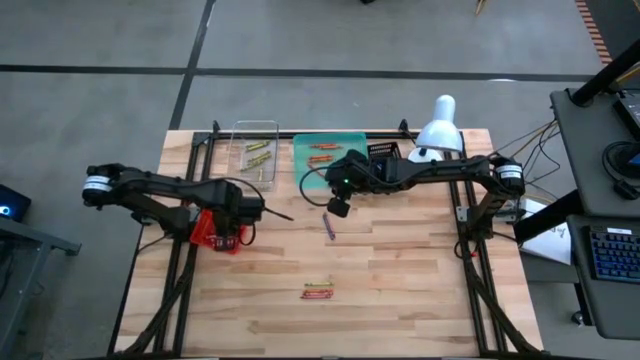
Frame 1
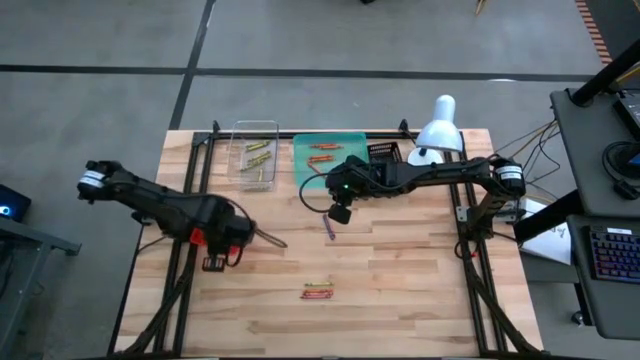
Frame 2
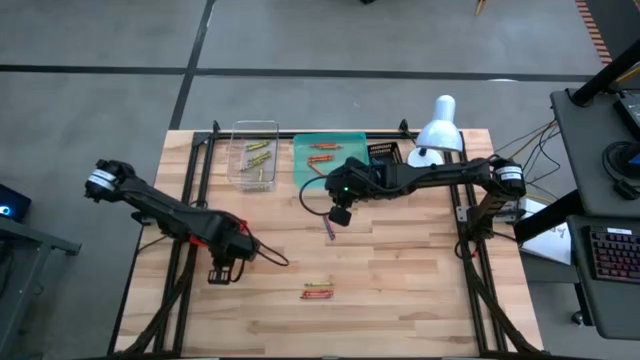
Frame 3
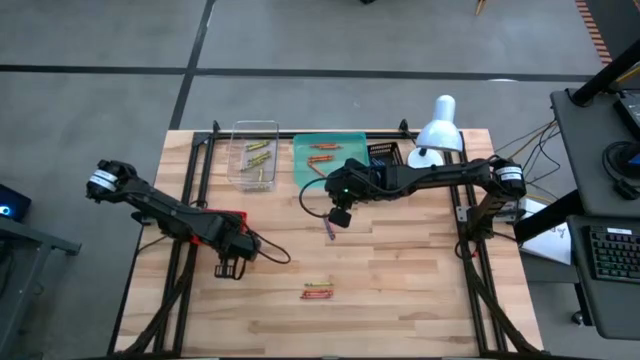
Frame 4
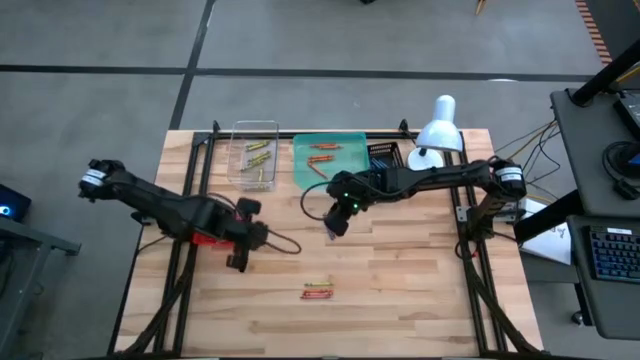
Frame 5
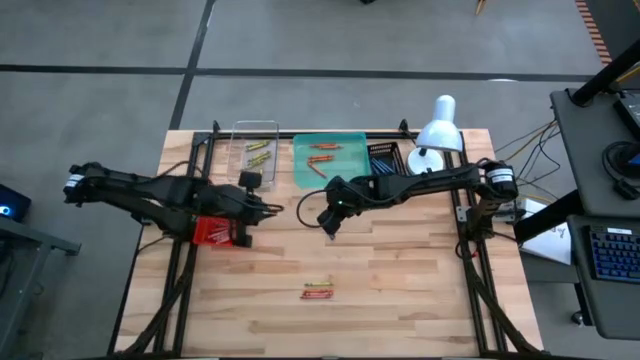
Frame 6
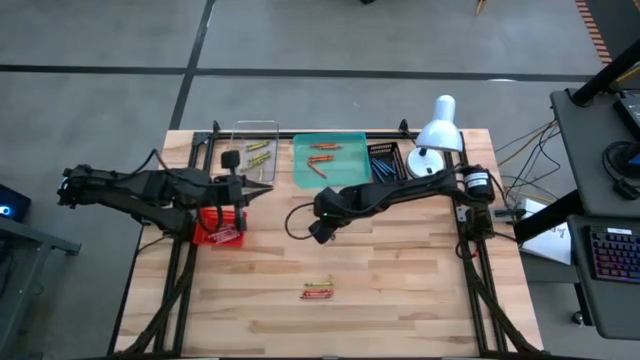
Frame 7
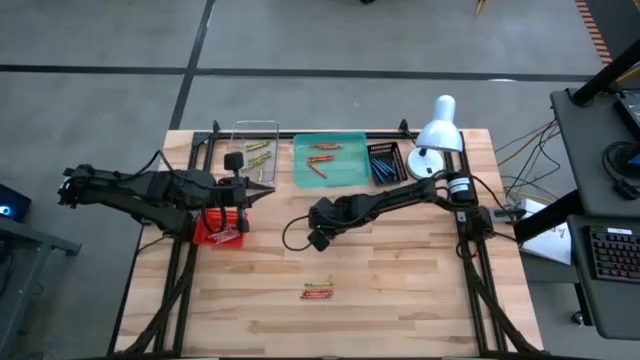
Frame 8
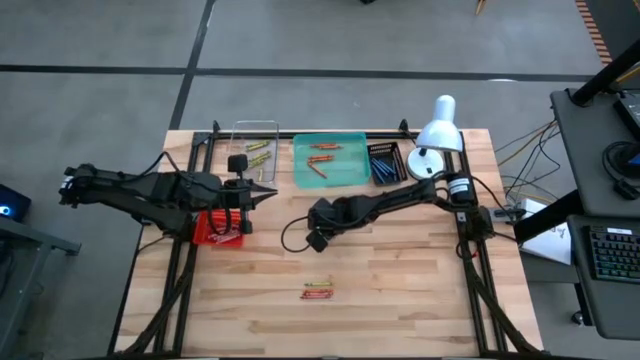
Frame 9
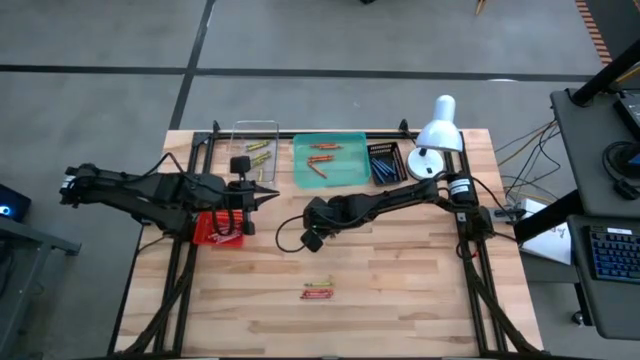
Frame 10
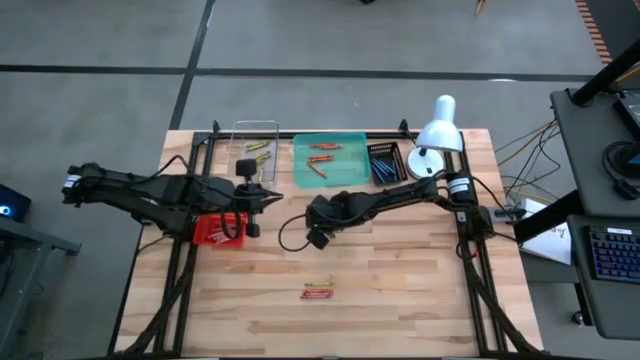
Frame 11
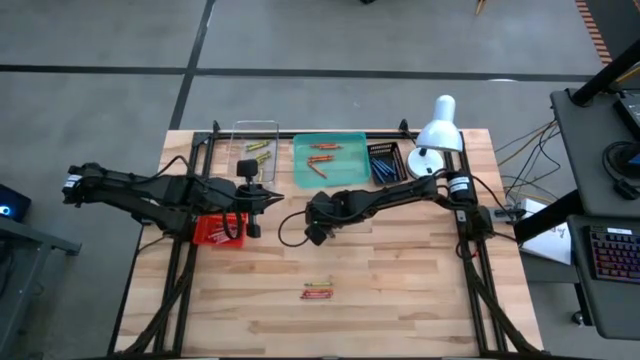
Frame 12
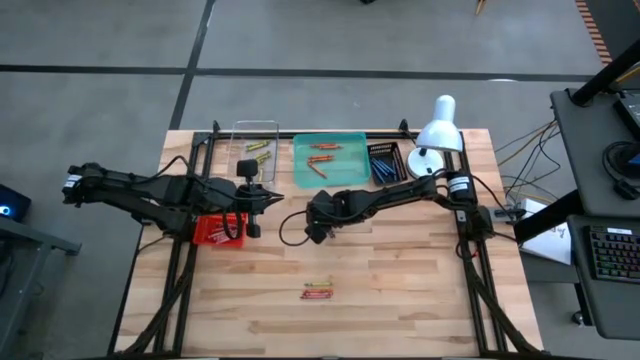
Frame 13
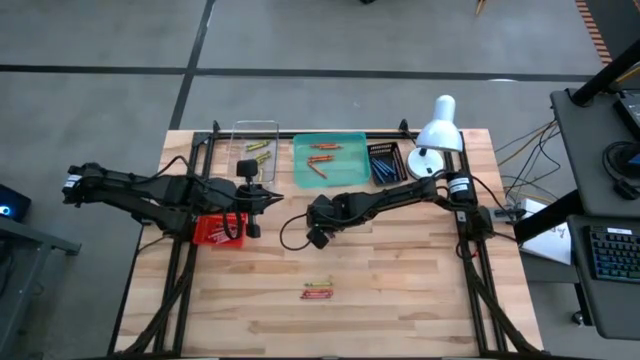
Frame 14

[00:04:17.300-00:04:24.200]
Task: Sort crayons
Put the blue crayon into the black bin

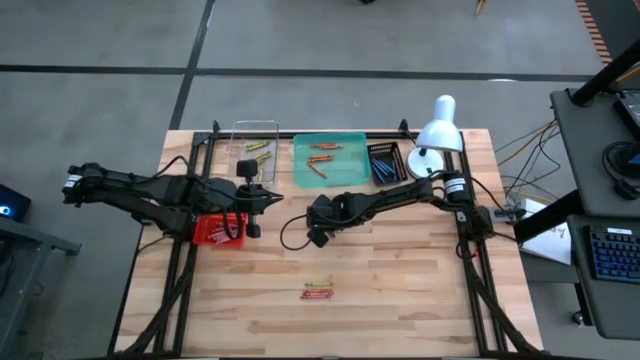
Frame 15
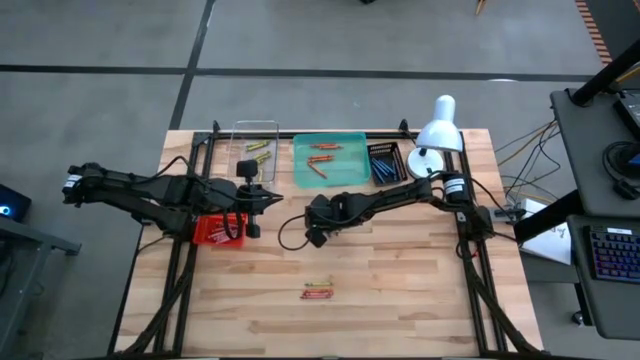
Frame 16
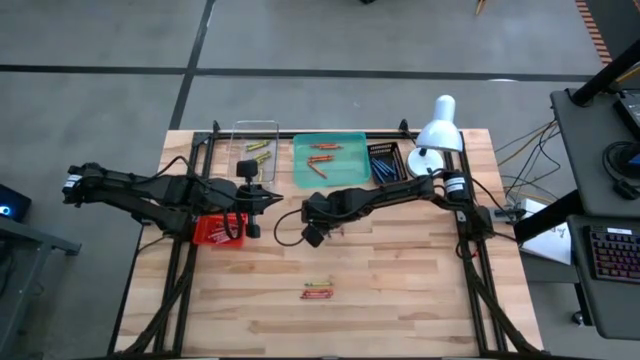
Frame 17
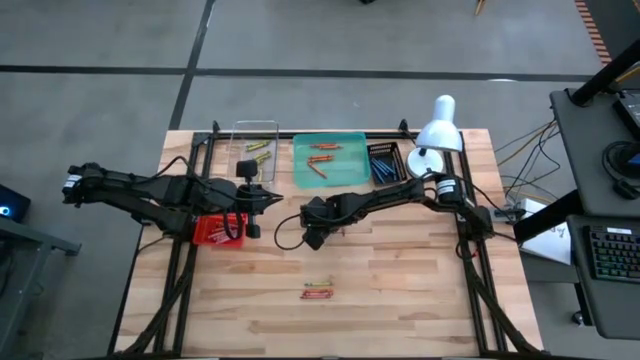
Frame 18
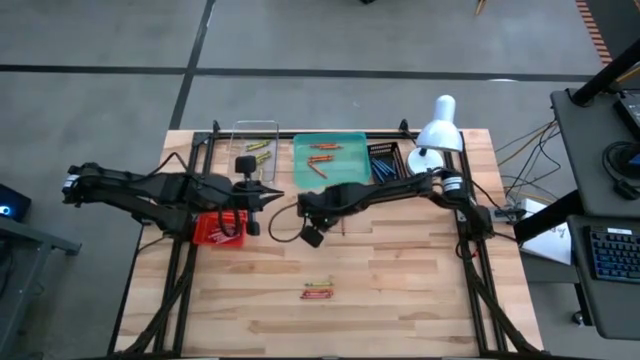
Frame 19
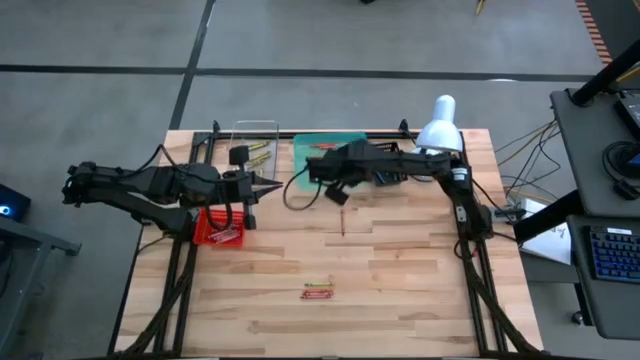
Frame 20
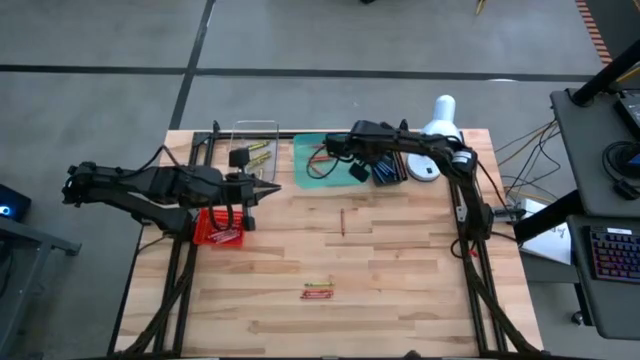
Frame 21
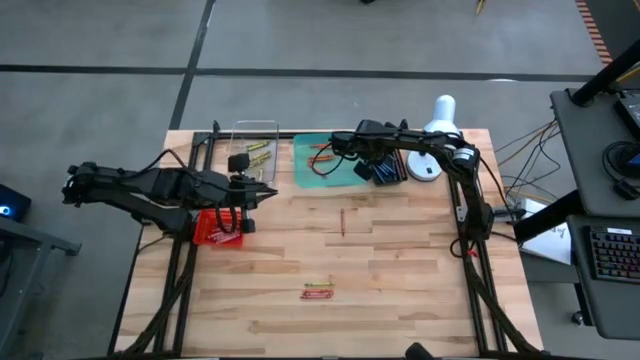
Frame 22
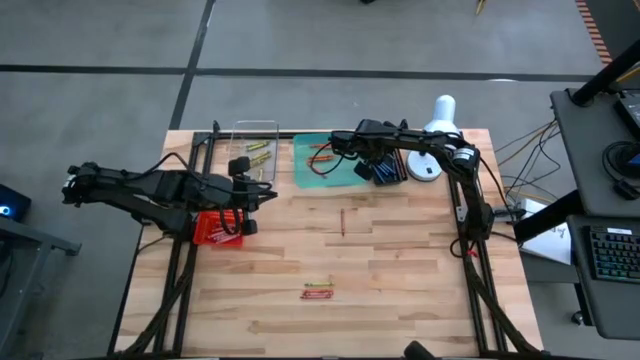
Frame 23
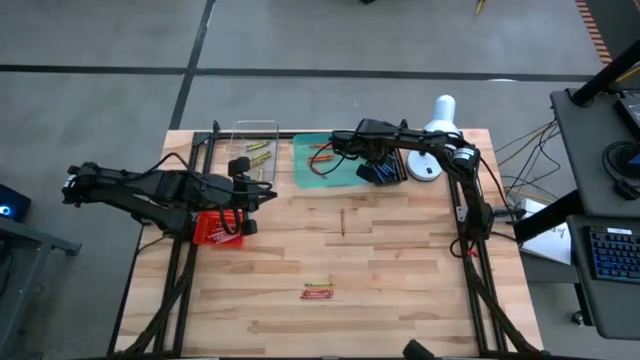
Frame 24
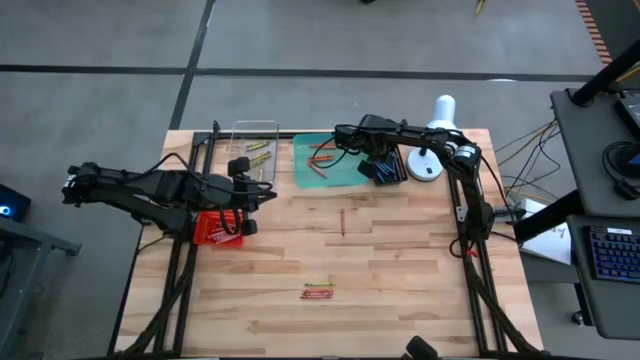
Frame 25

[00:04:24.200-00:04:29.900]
Put the blue crayon into the black bin

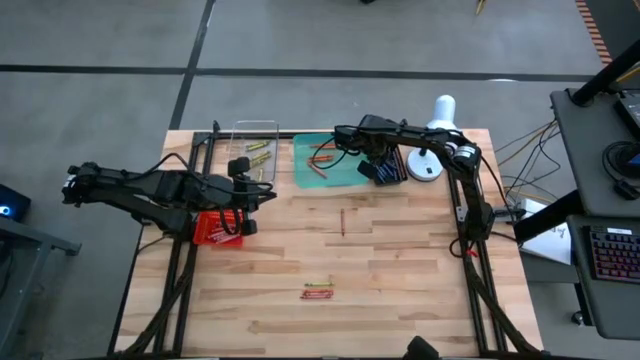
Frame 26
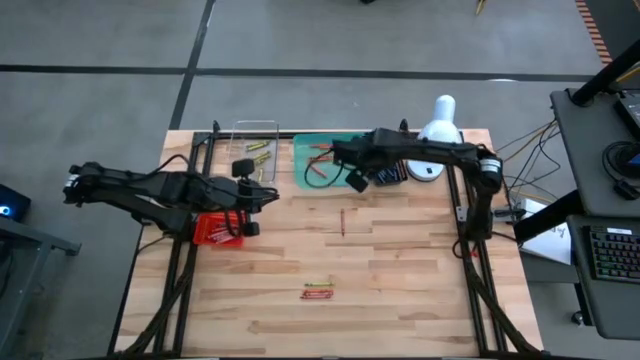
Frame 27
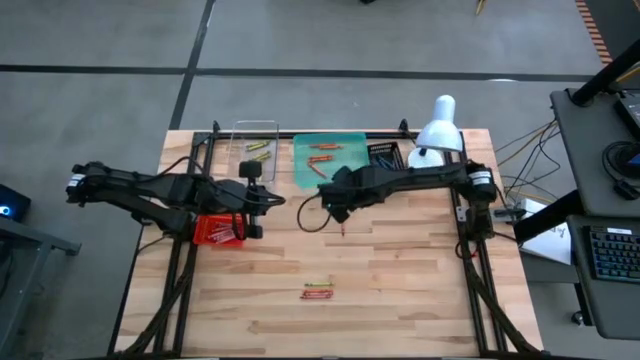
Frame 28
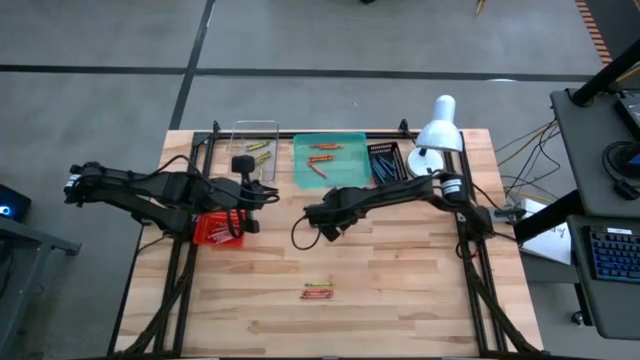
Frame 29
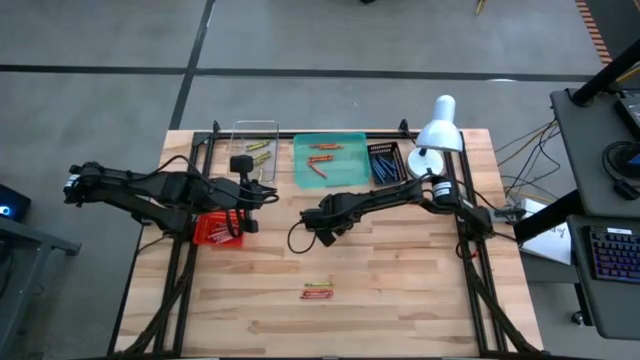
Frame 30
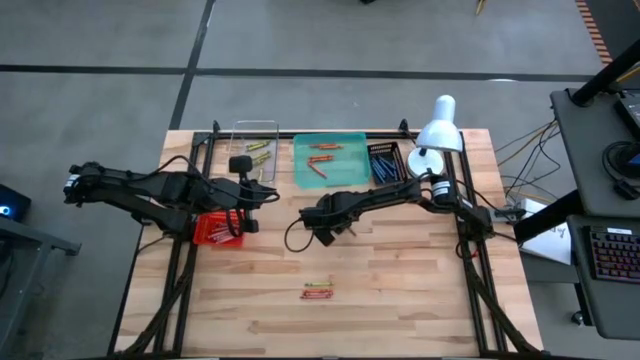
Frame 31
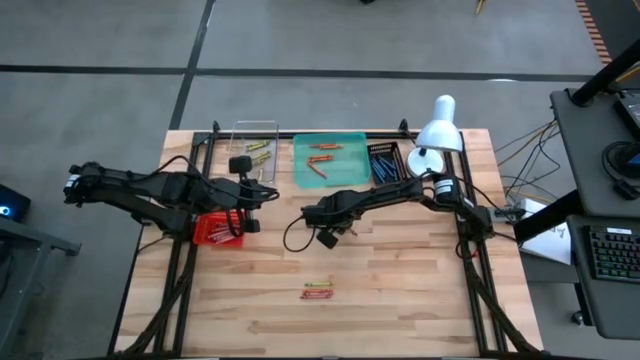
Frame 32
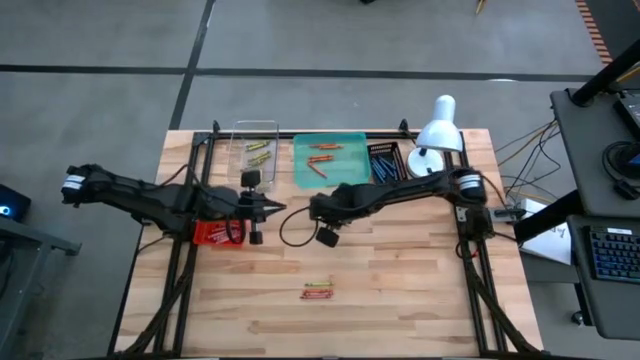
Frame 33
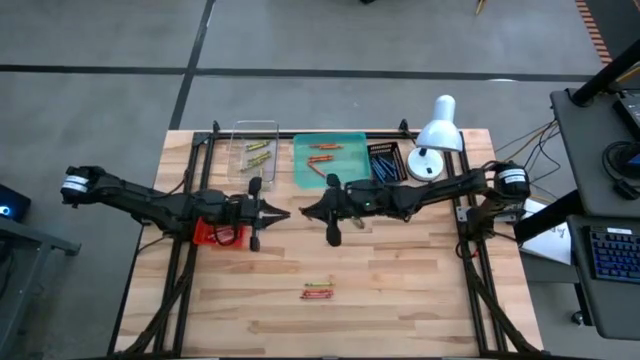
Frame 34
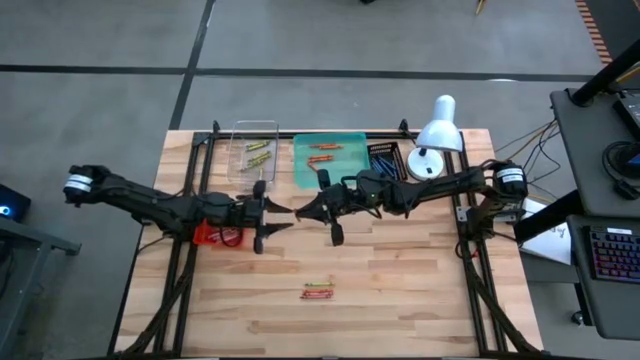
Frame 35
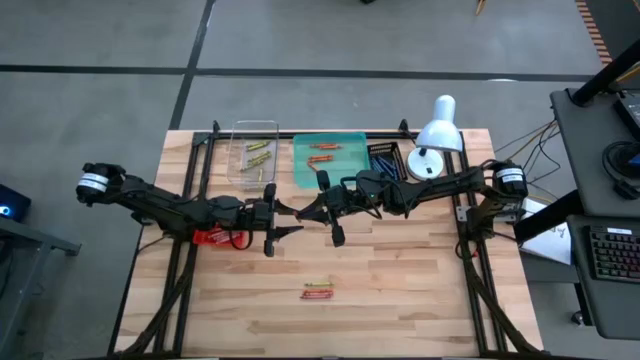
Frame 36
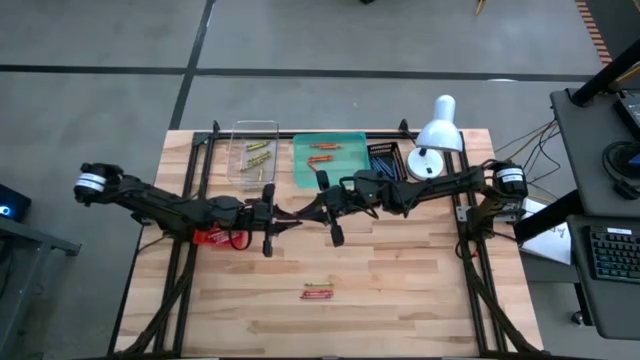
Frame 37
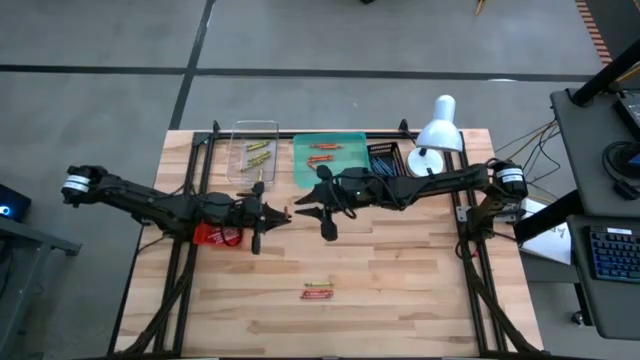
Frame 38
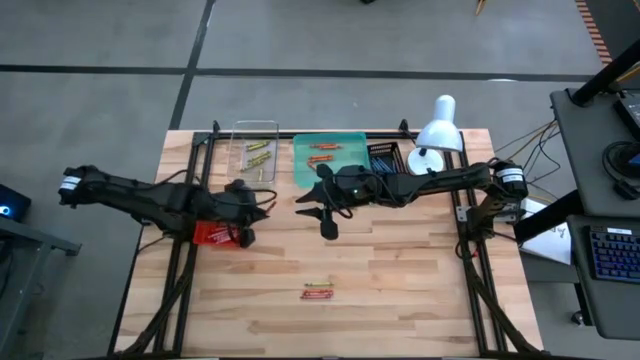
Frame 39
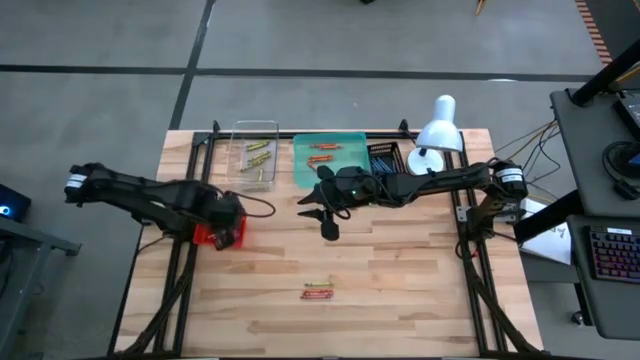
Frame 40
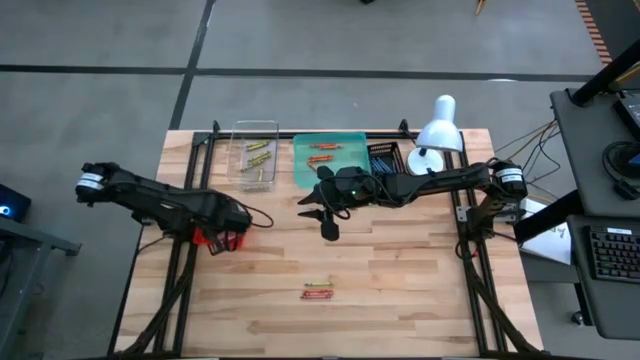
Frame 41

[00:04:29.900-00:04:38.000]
Put the red crayon into the red bin
